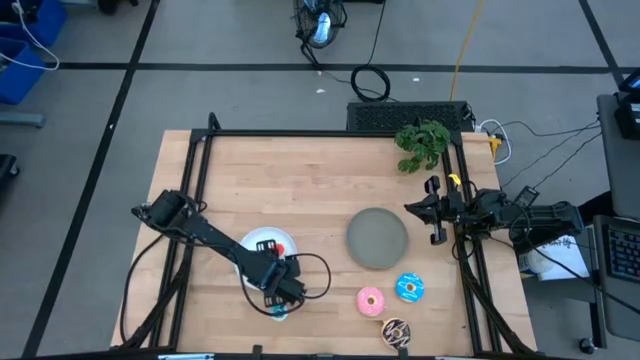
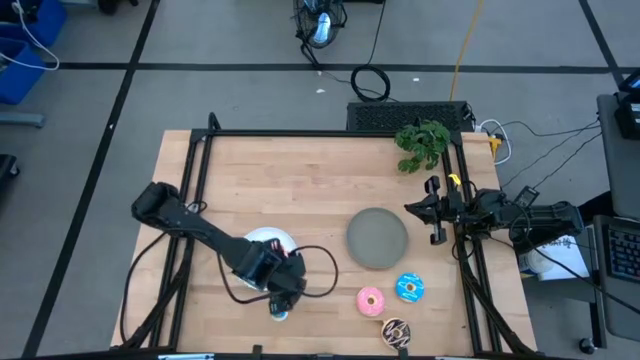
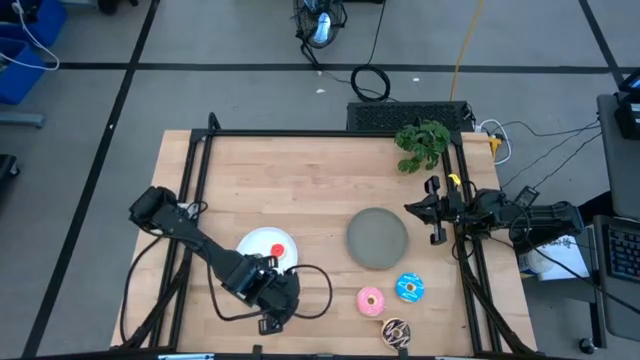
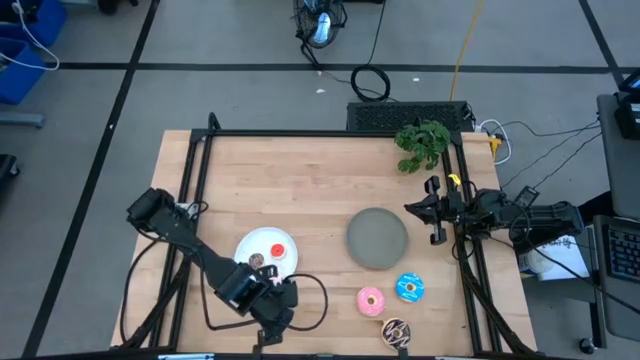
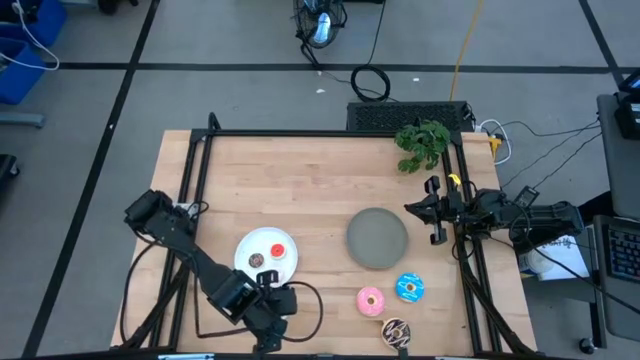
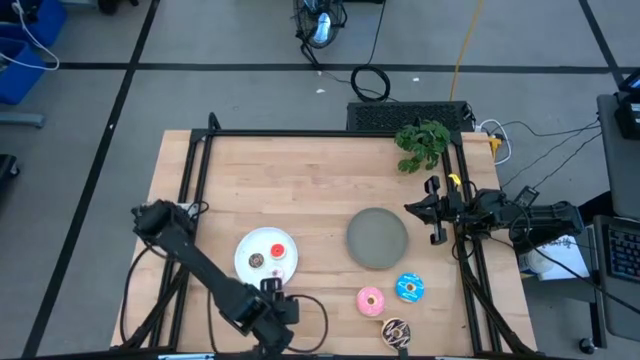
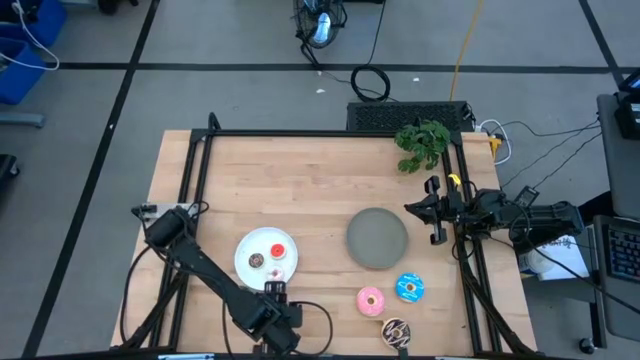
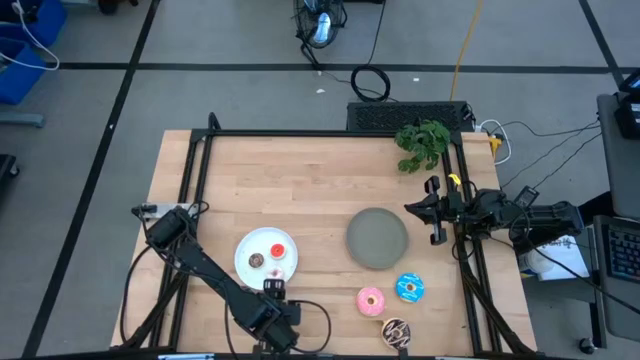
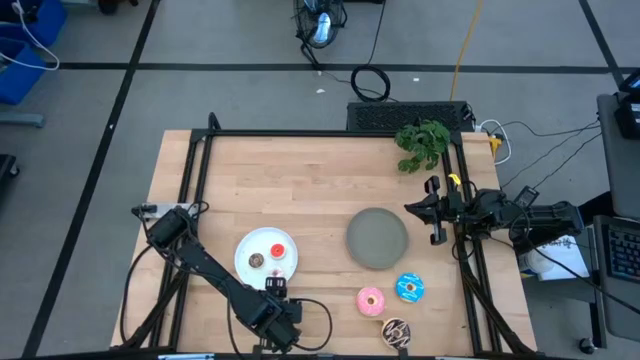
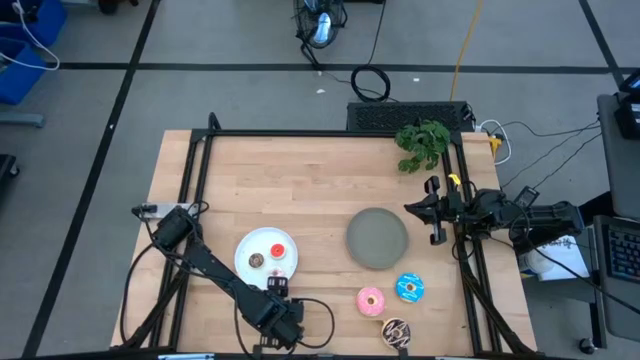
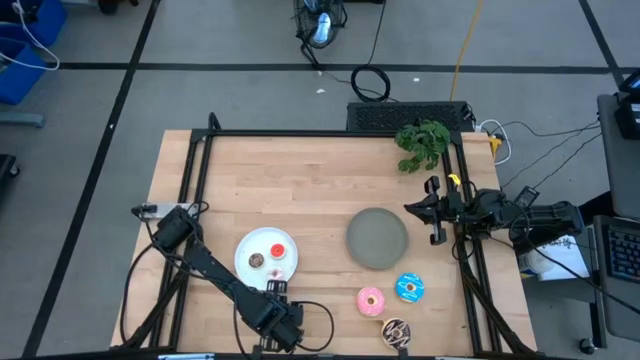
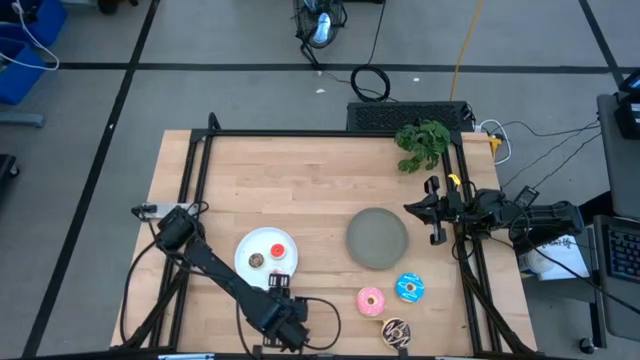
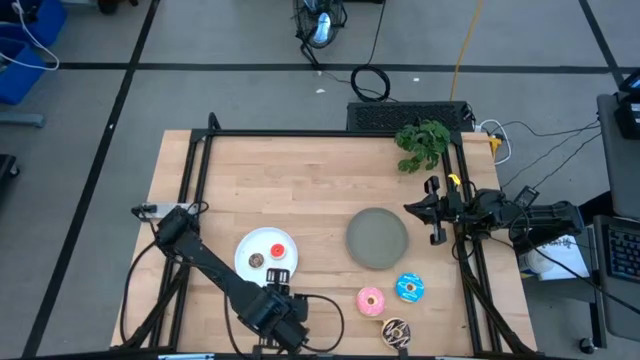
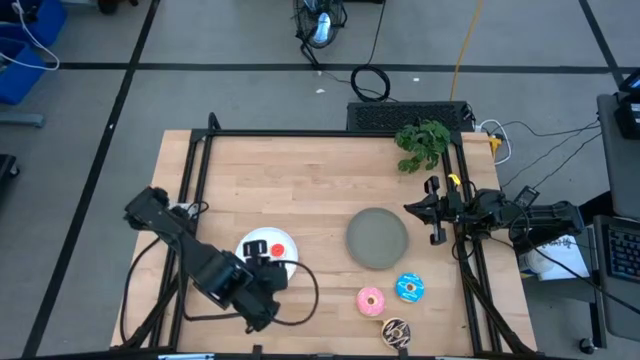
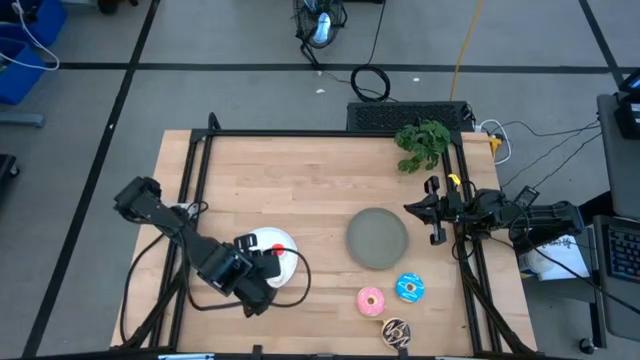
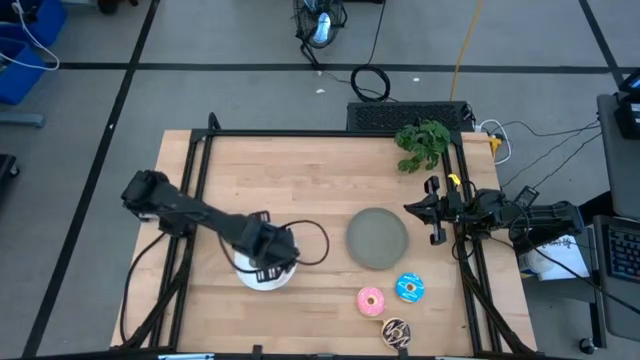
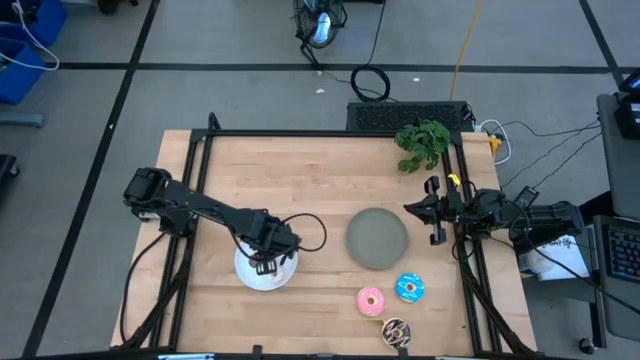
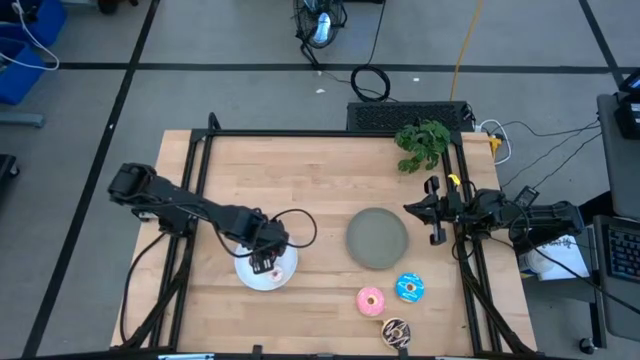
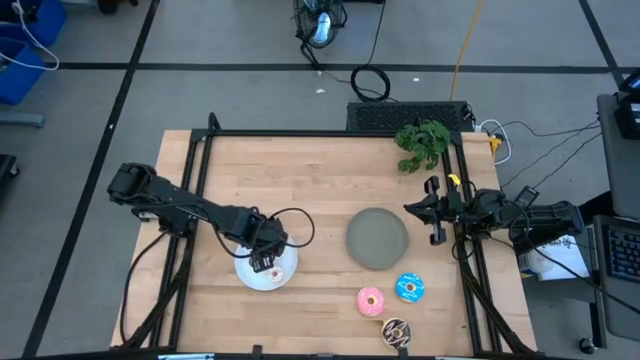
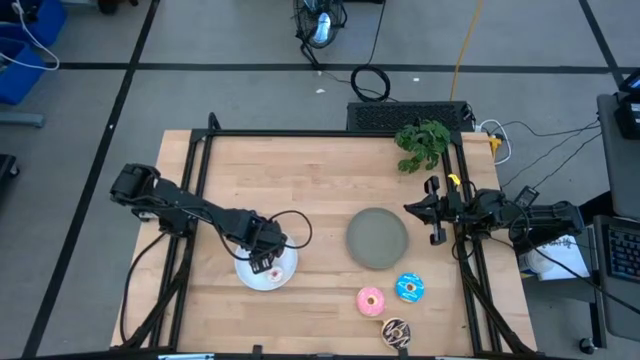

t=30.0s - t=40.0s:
Task: Pick & Place donuts
Put the small blue donut on the white plate

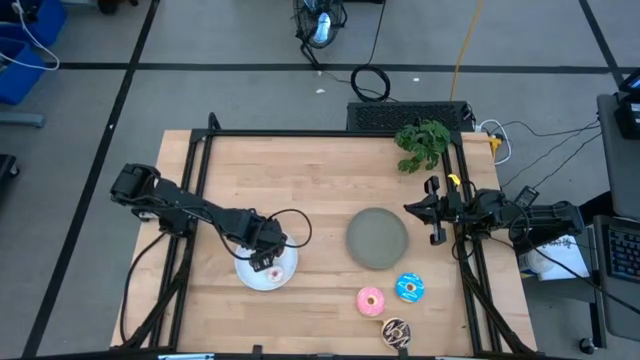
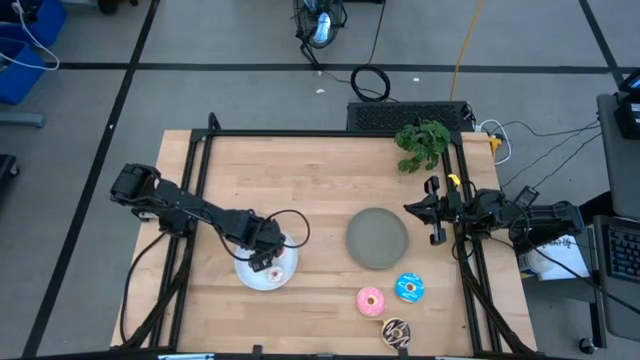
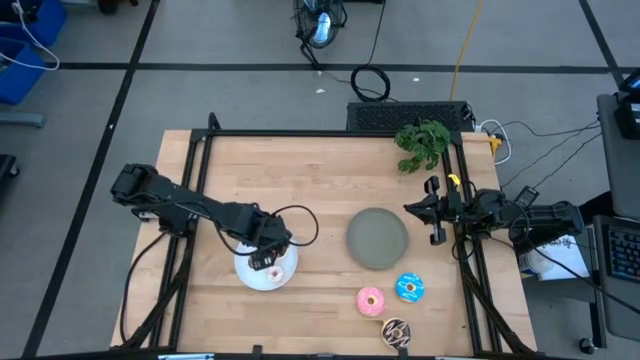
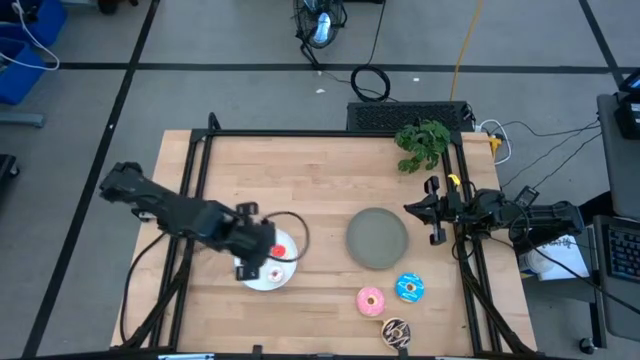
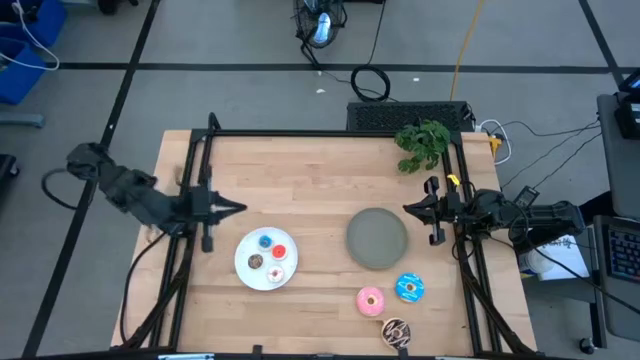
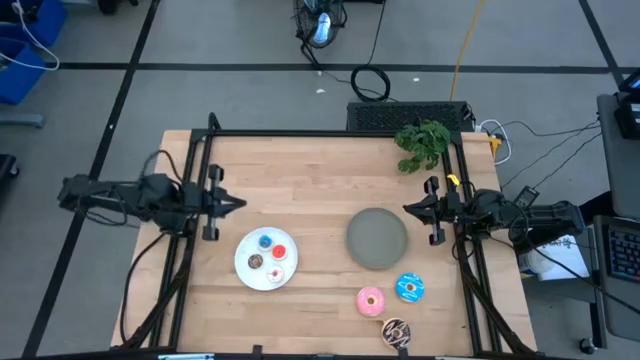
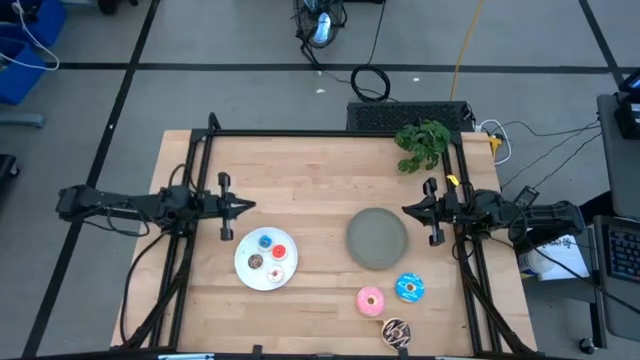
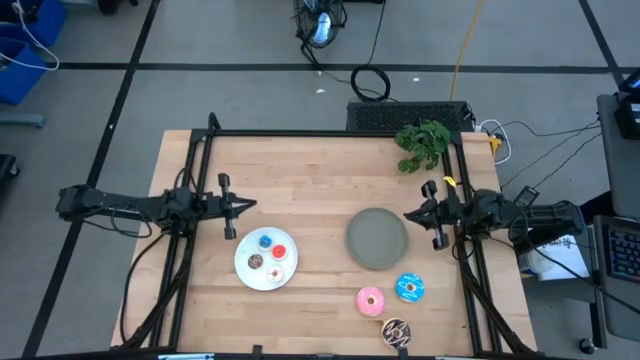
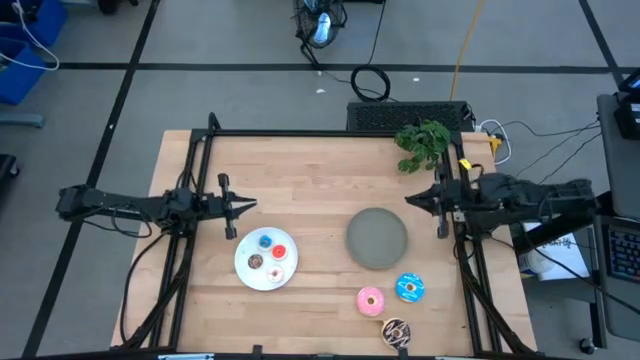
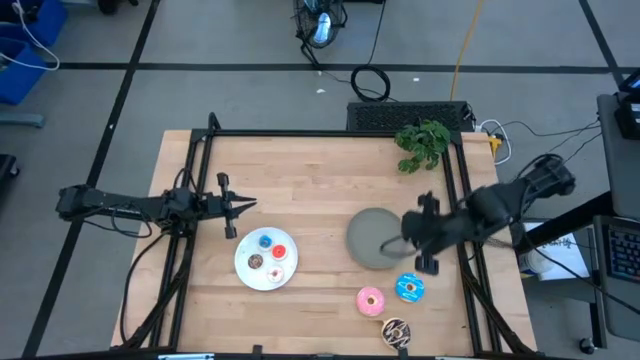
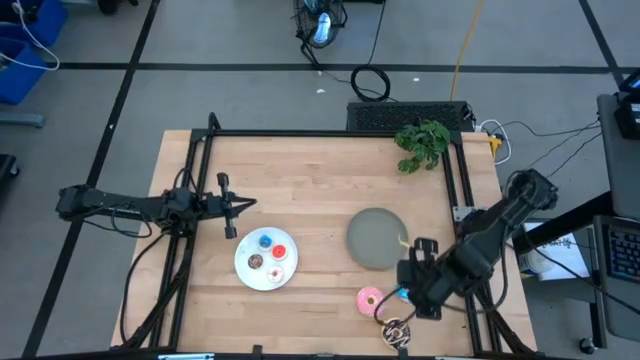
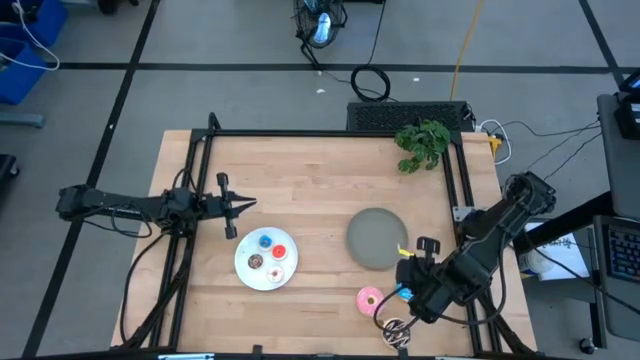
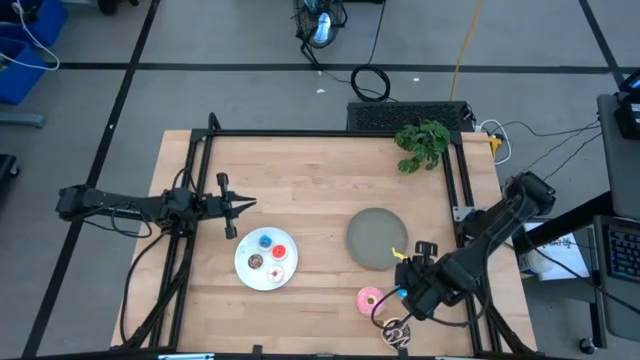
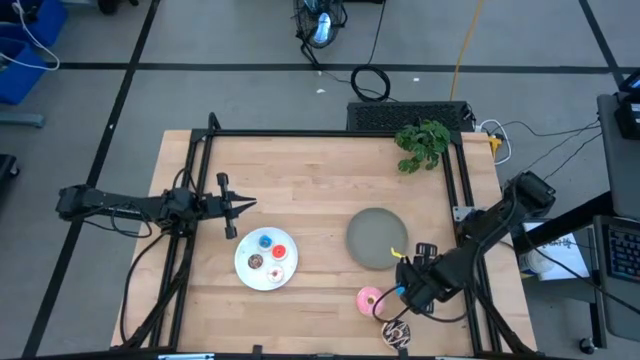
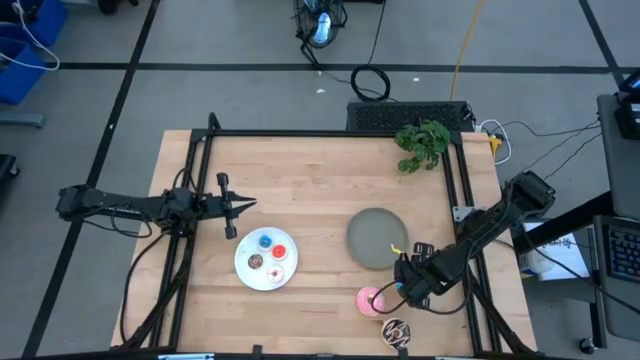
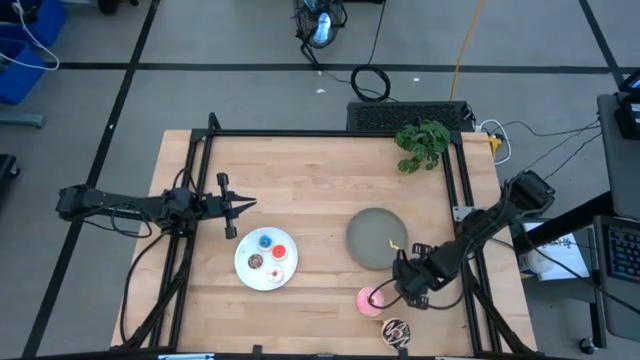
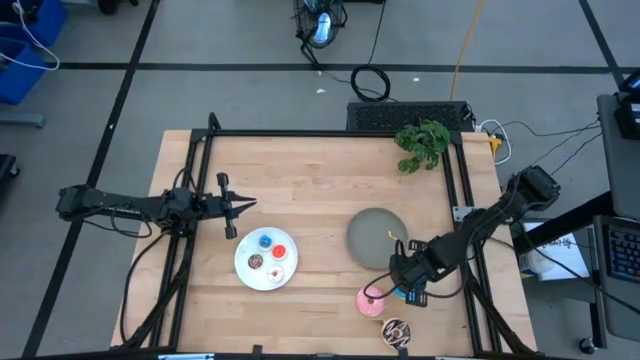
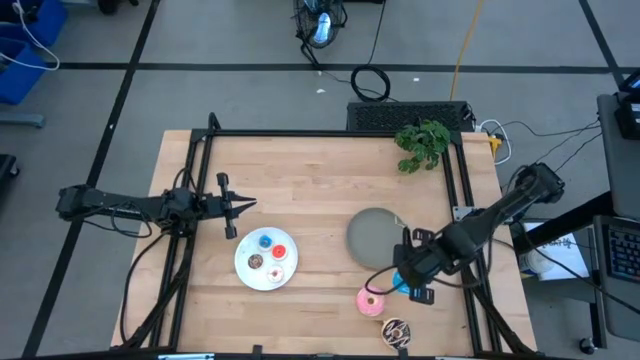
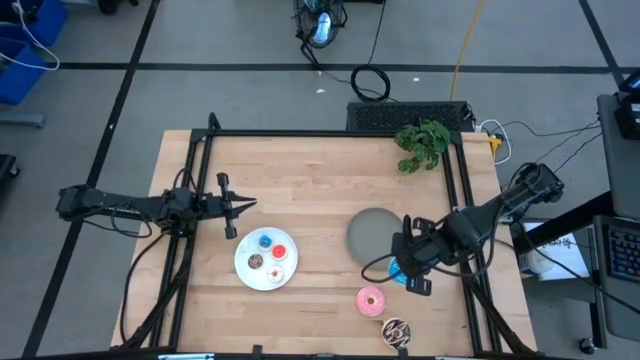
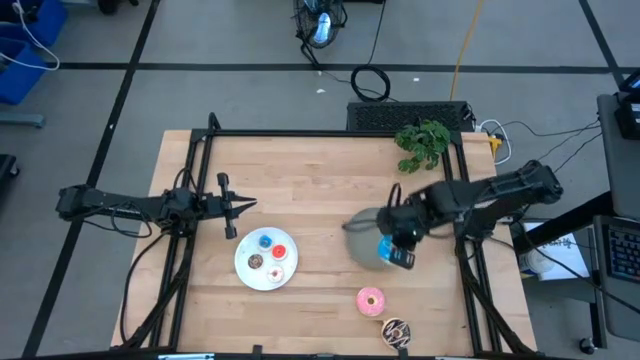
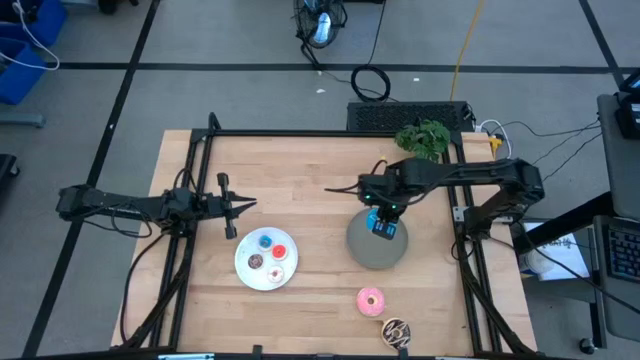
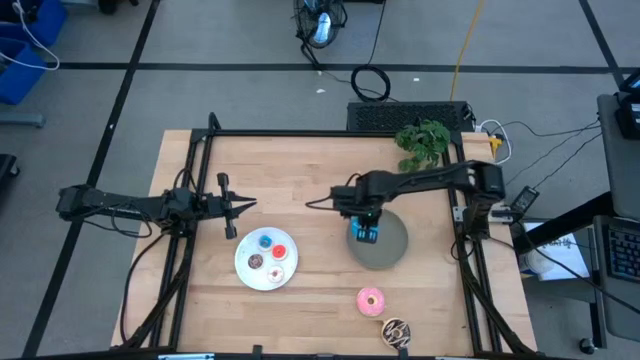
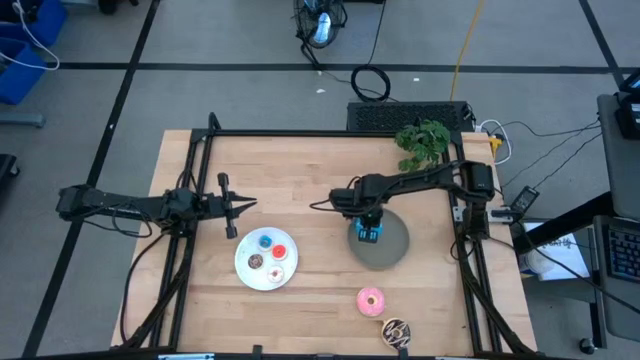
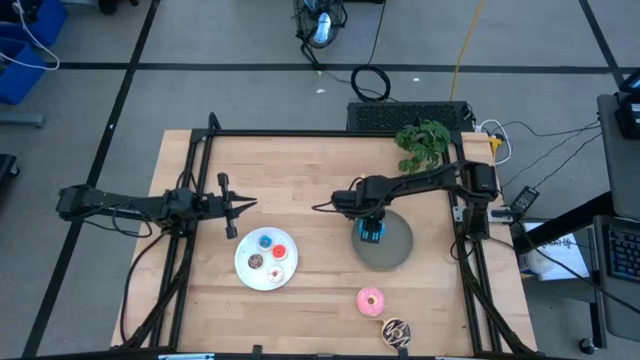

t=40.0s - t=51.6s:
Put the big blue donut on the gray plate
